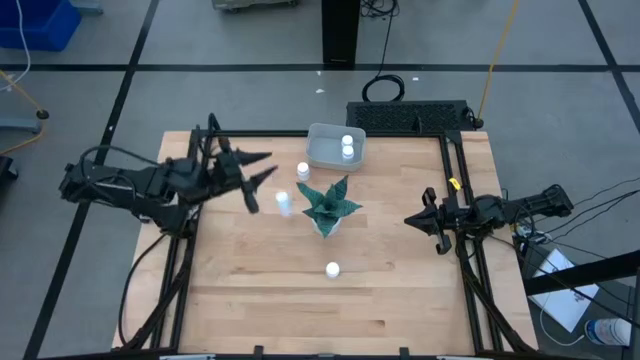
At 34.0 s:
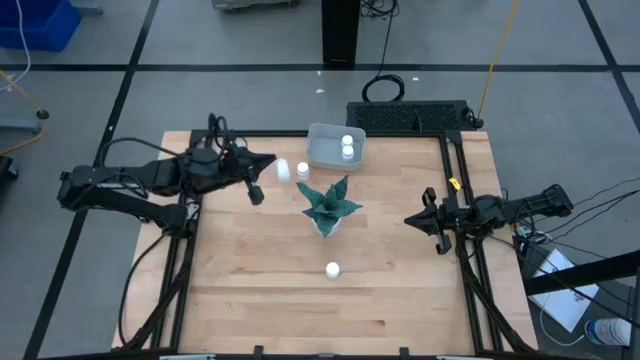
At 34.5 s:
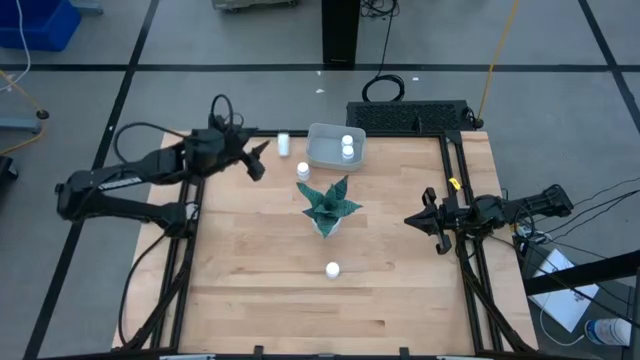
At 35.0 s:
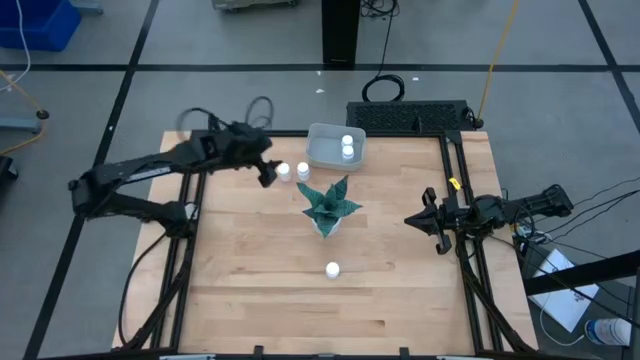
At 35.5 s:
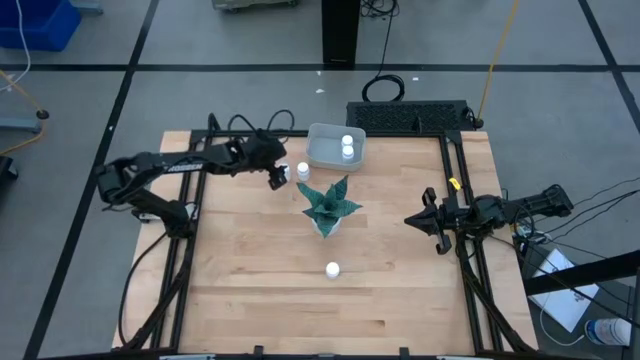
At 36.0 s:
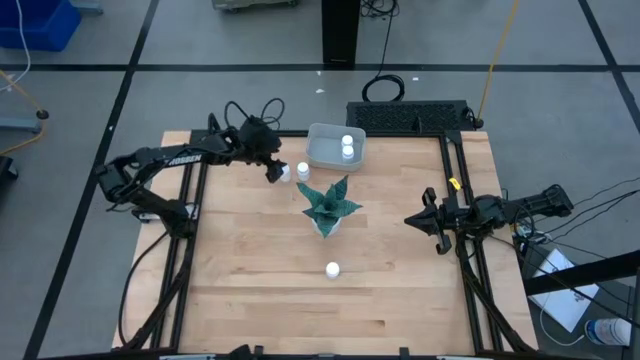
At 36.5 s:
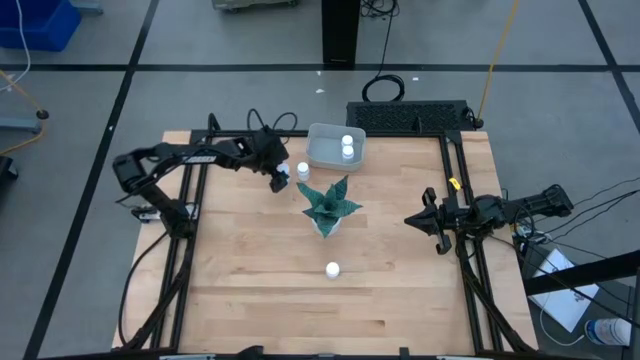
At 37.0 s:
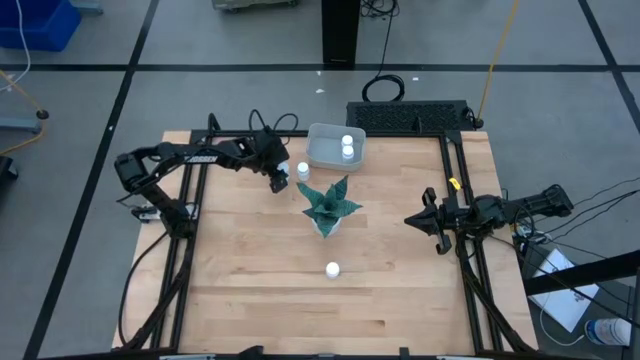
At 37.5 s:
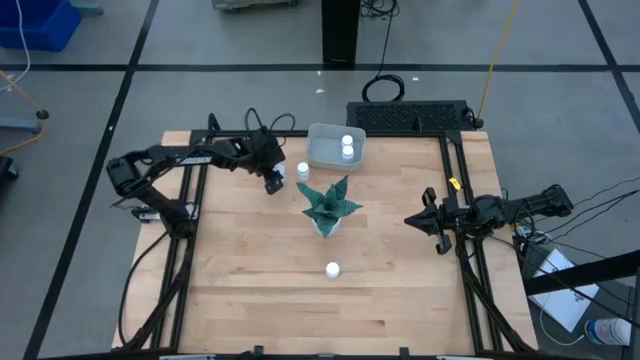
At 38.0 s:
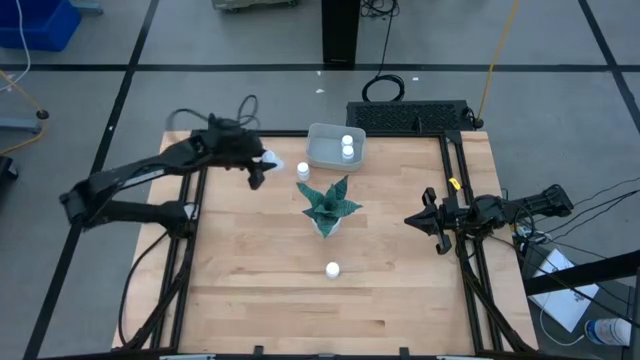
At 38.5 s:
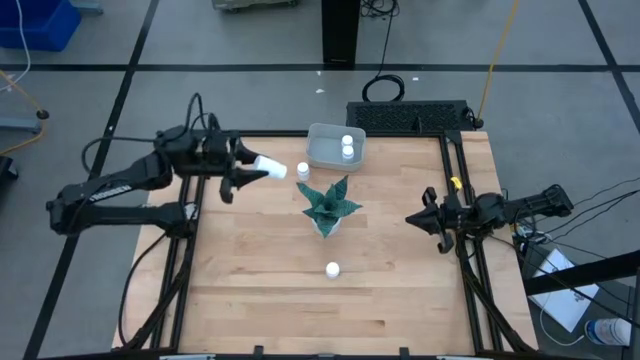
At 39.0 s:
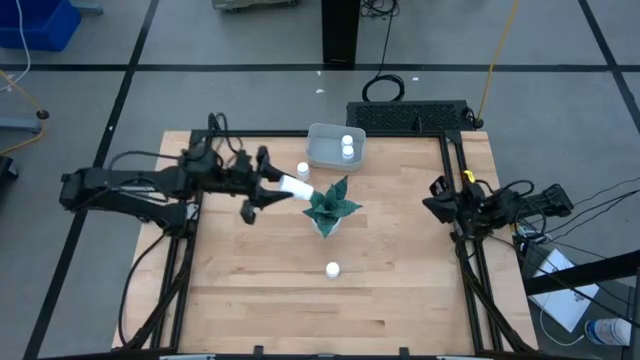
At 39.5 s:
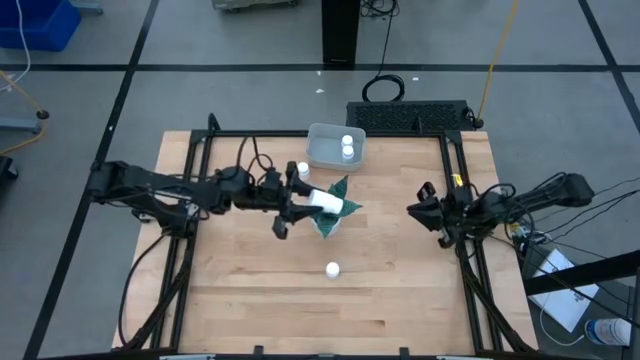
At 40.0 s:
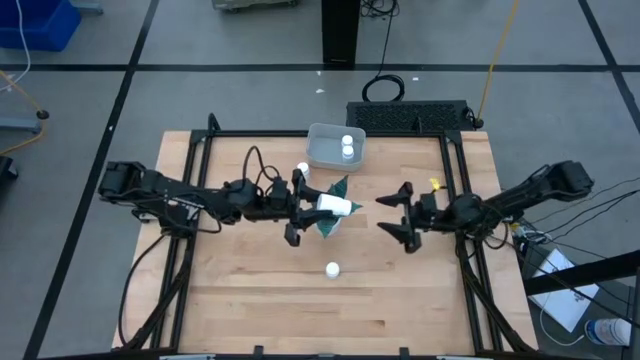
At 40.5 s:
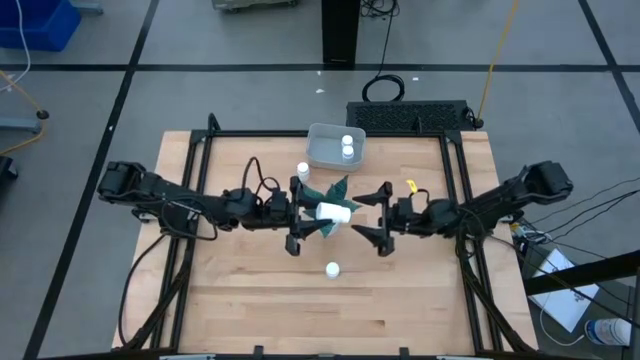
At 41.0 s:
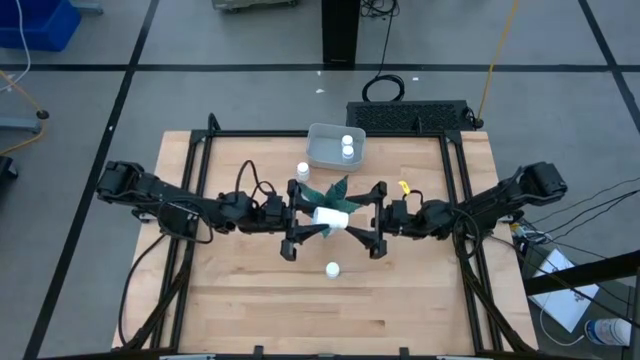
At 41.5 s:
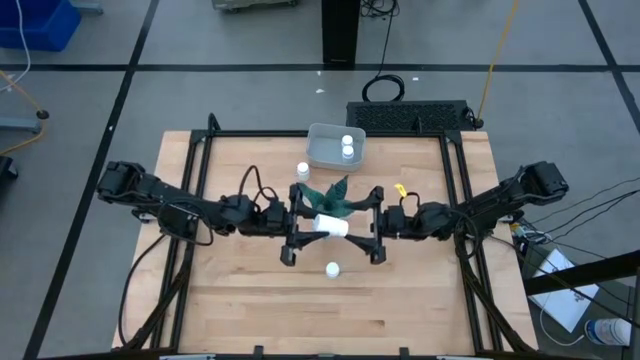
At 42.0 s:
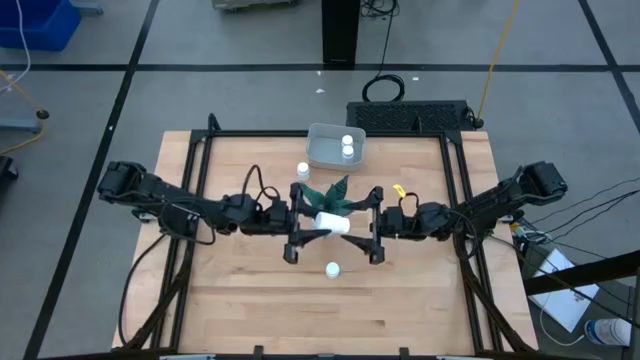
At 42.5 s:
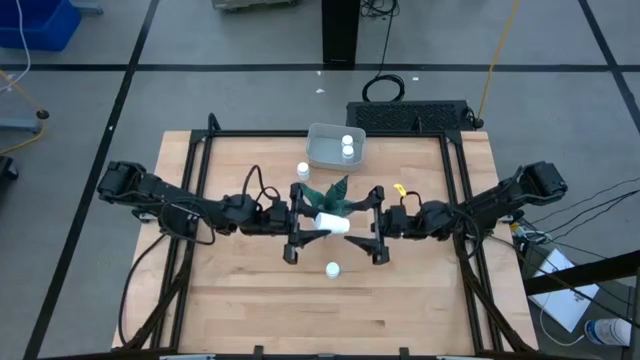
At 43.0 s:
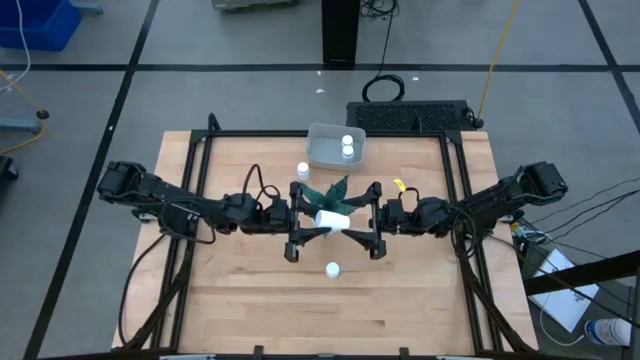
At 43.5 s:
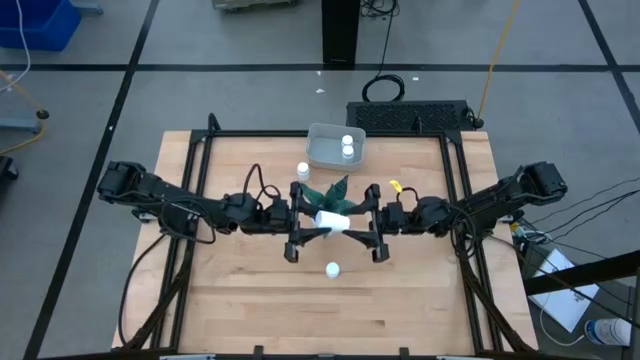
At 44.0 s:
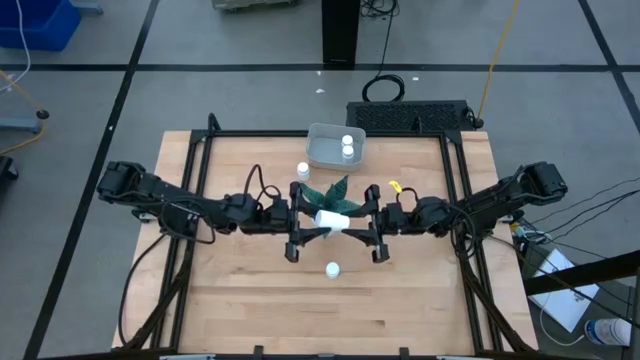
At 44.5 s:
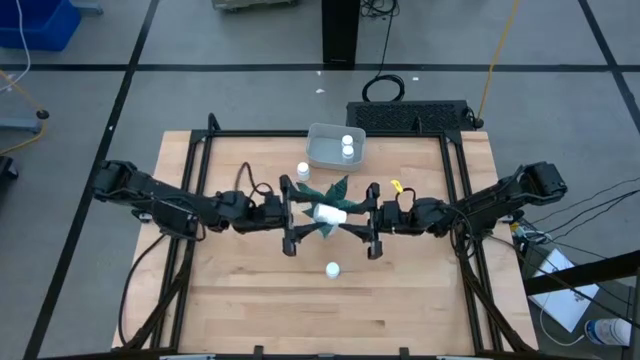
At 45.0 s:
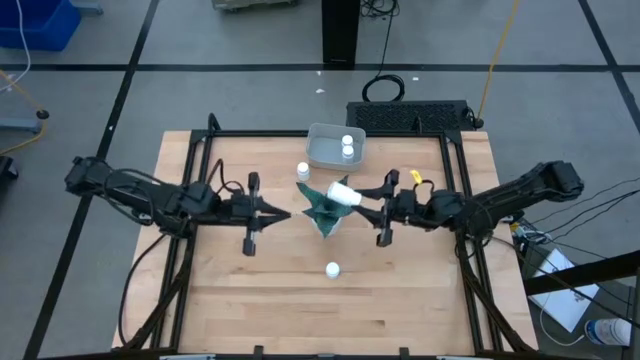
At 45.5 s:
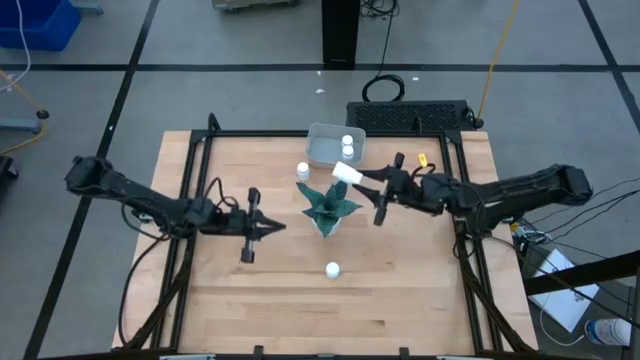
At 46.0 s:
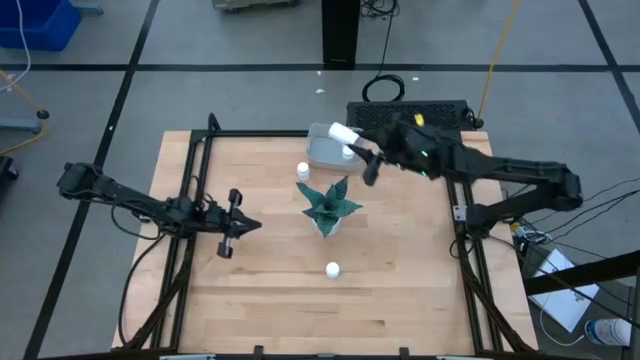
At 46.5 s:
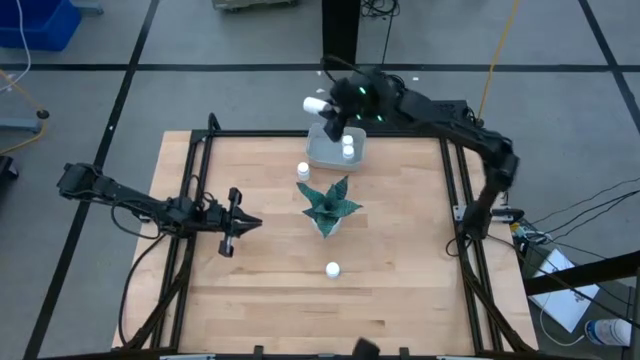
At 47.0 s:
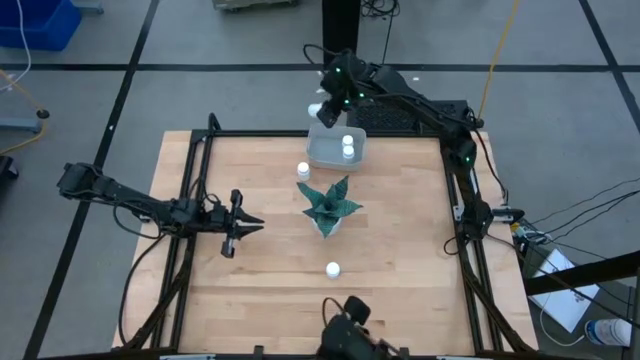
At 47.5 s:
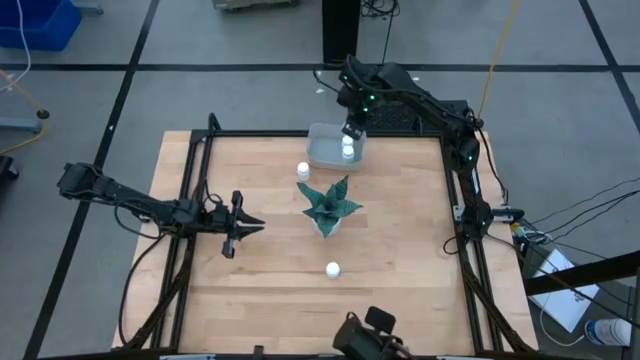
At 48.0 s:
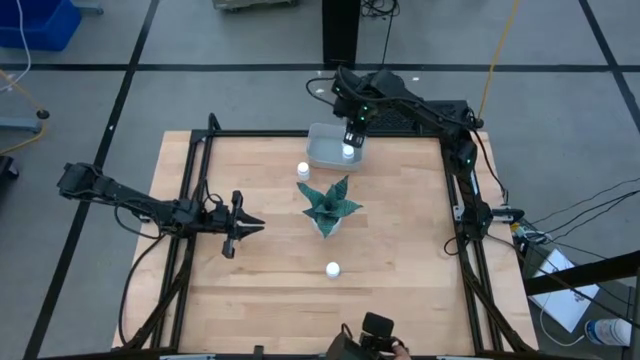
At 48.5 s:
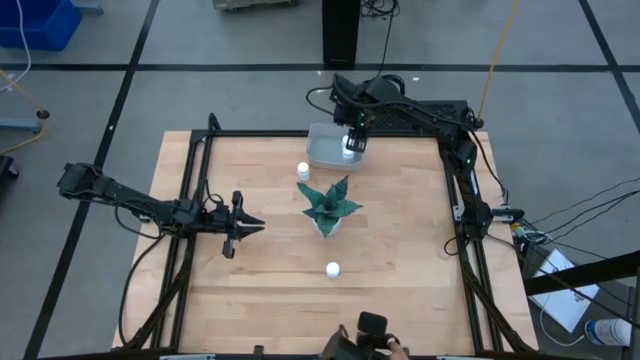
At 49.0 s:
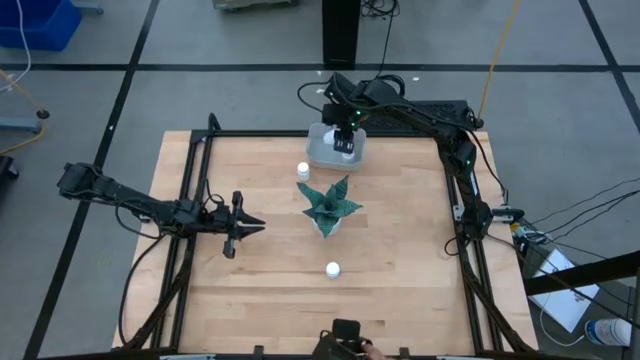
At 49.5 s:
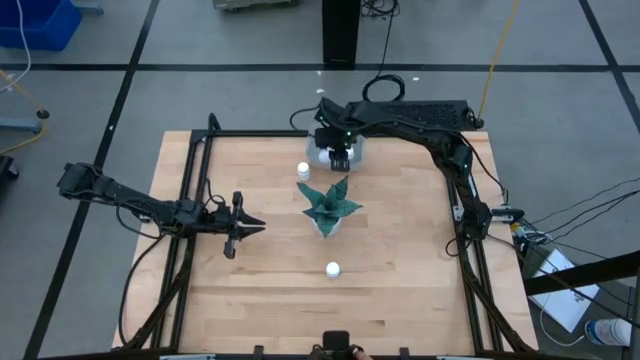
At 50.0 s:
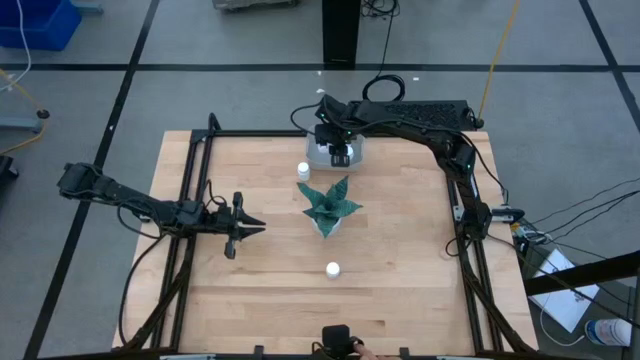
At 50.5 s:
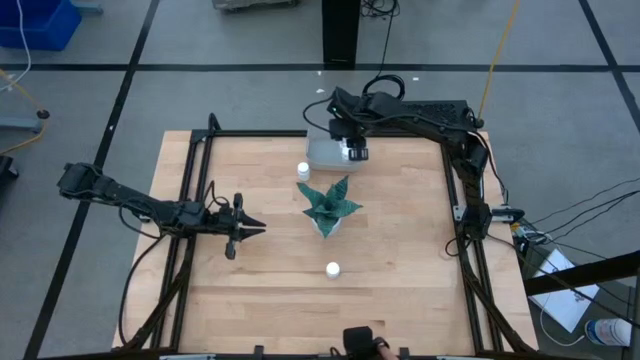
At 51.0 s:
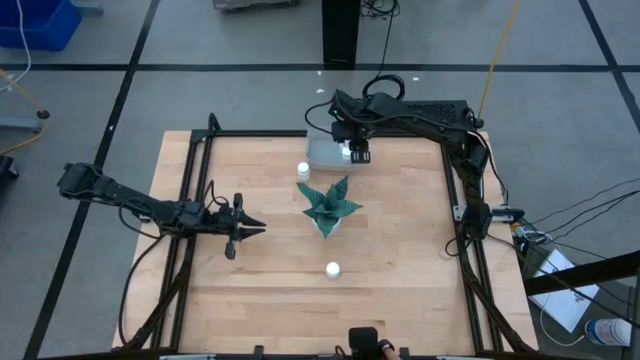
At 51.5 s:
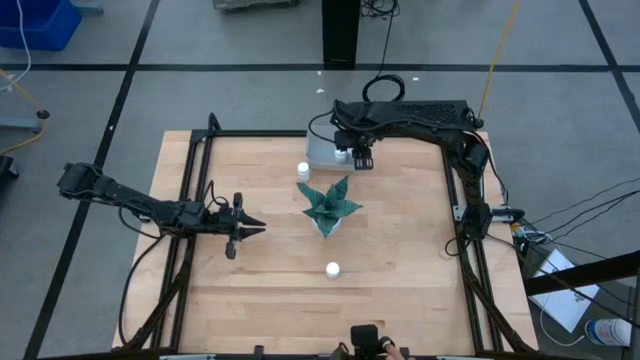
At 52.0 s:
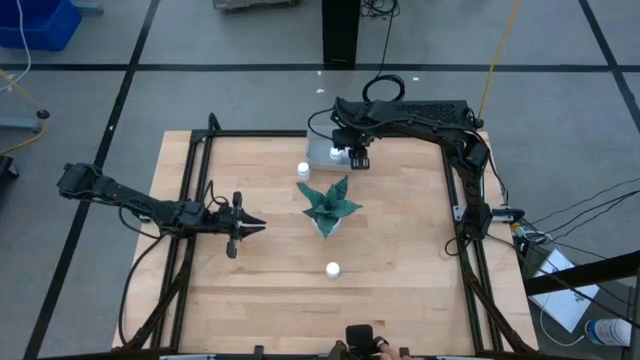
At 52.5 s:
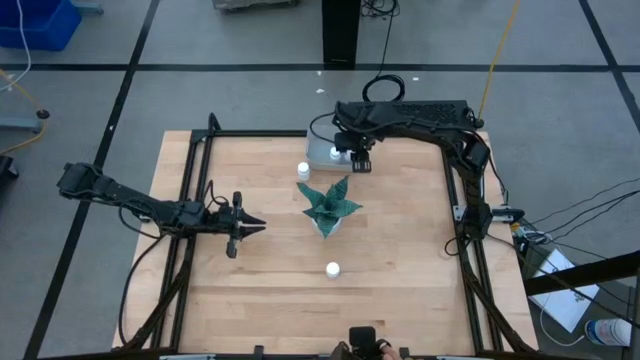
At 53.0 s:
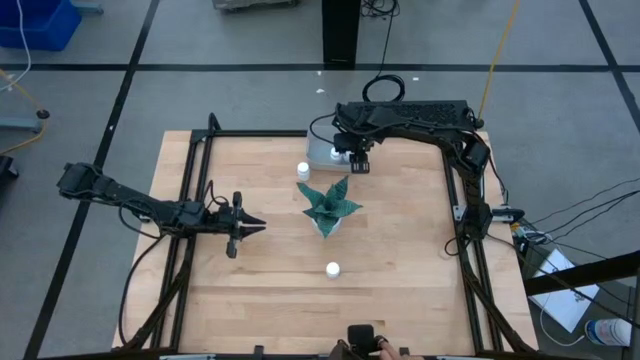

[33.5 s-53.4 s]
Task: Pick and place pill bottles into a basket
Put the white medicine bottle into the gray bin

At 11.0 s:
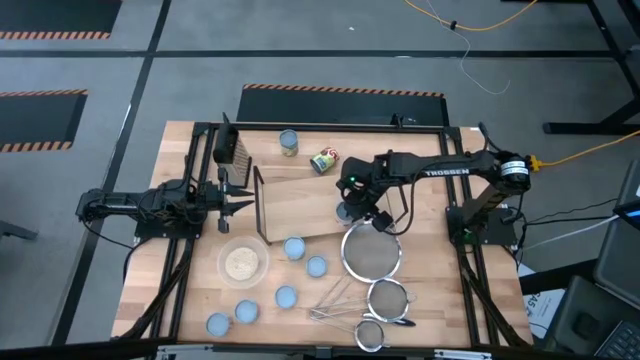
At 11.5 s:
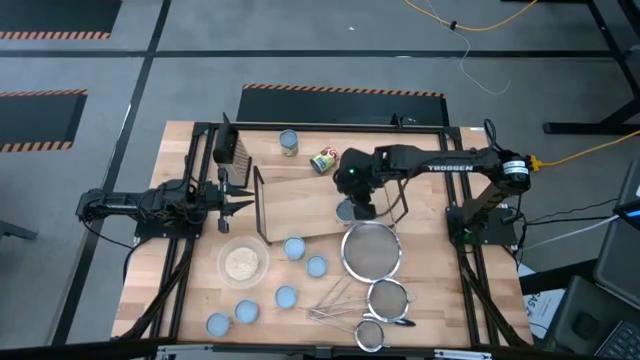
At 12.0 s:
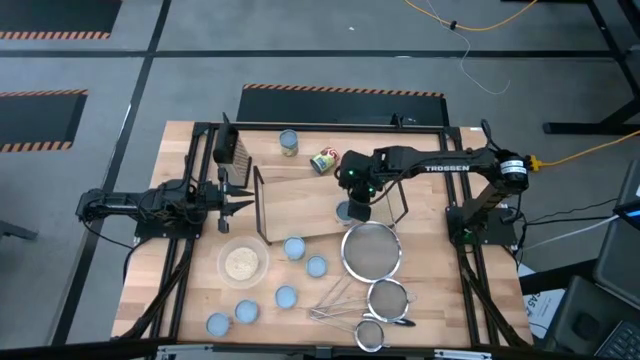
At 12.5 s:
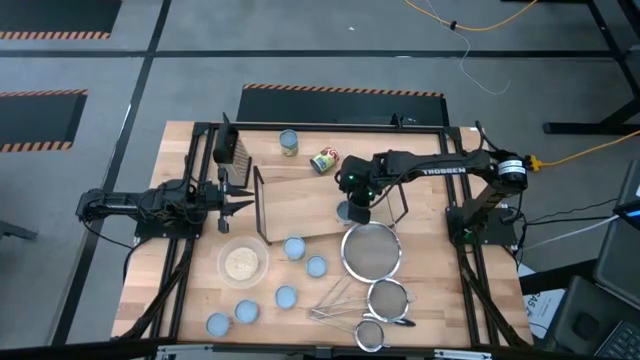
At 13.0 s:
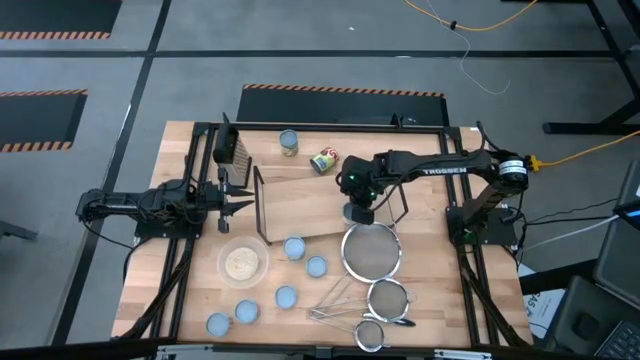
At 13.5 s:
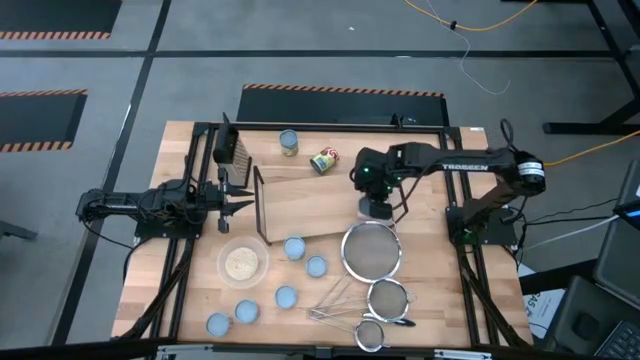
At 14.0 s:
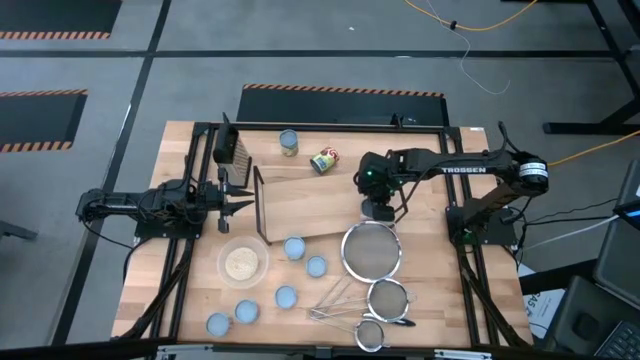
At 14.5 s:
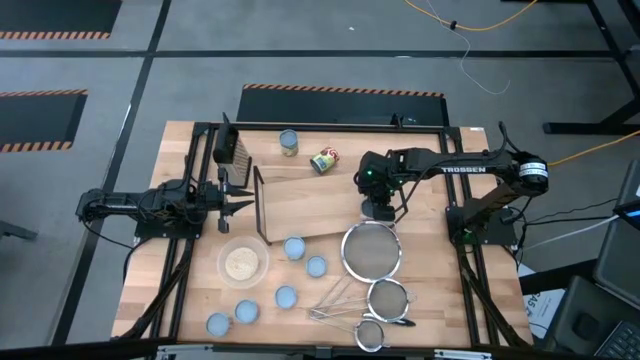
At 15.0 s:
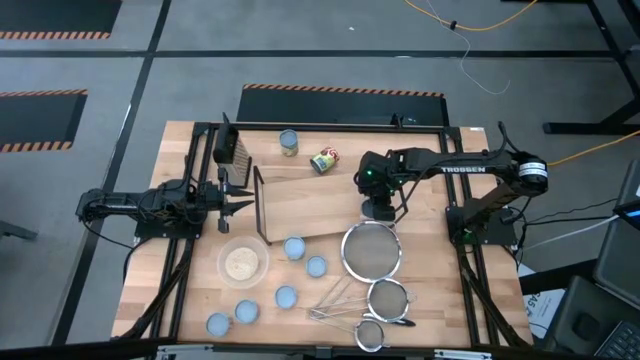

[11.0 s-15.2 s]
Task: Pick and place cans onto a shelf
Adjust the large orange can on the shelf
